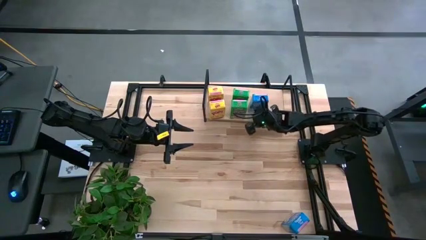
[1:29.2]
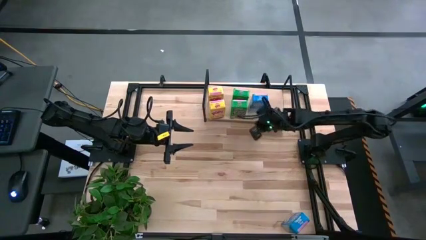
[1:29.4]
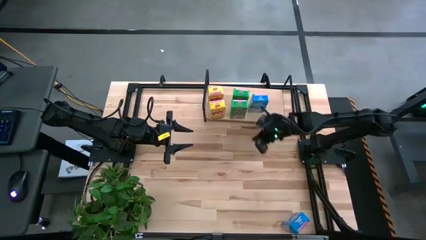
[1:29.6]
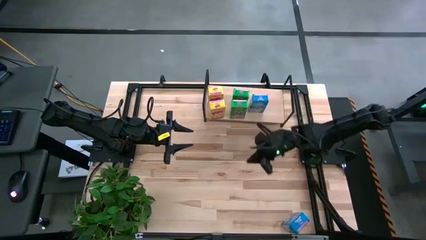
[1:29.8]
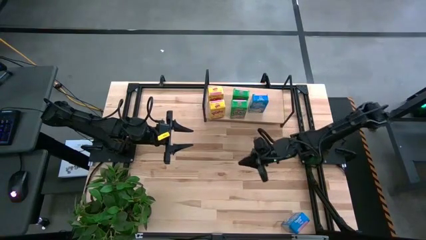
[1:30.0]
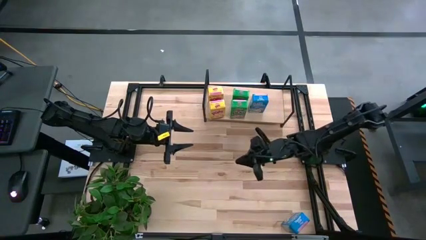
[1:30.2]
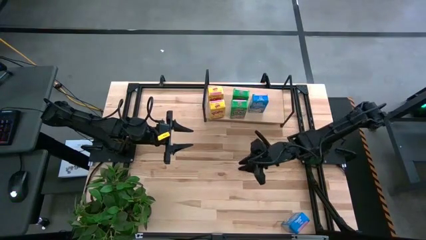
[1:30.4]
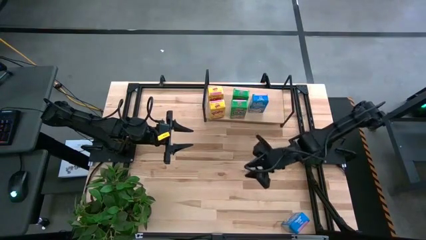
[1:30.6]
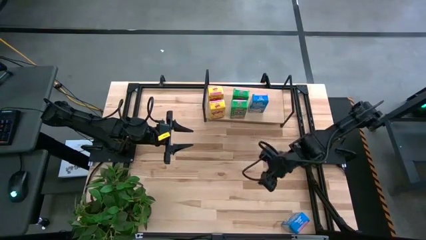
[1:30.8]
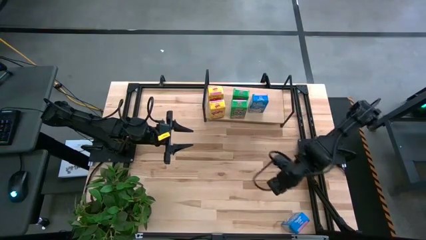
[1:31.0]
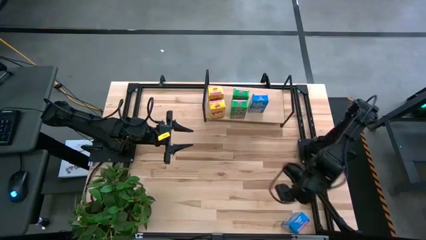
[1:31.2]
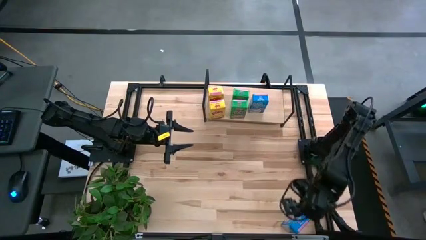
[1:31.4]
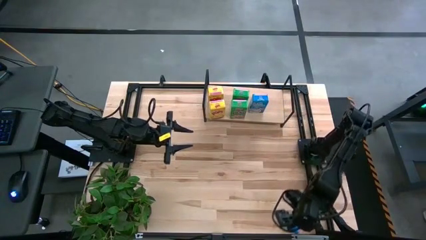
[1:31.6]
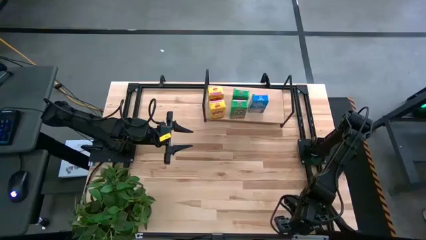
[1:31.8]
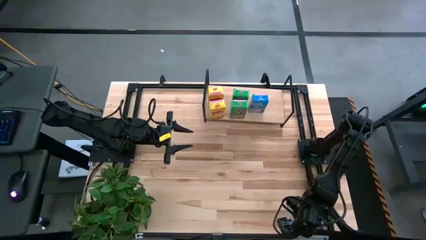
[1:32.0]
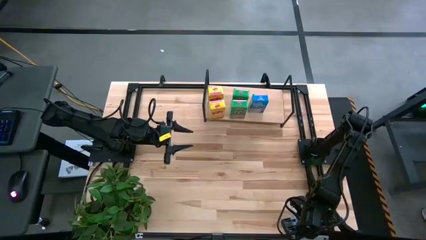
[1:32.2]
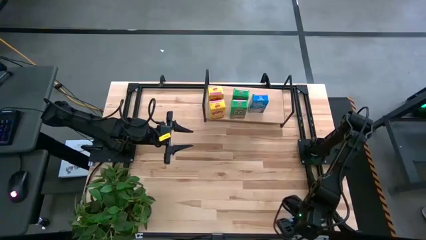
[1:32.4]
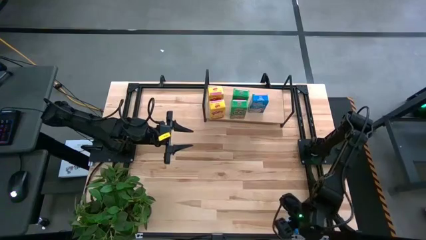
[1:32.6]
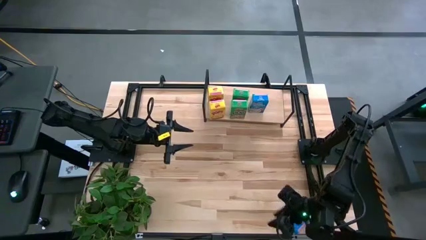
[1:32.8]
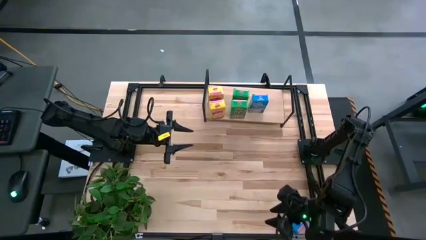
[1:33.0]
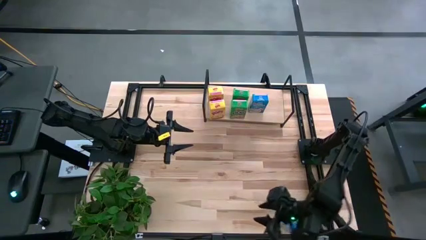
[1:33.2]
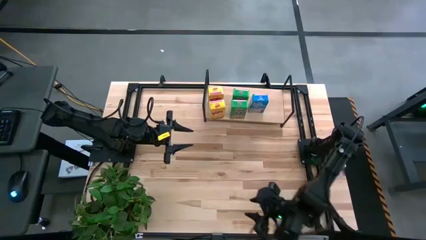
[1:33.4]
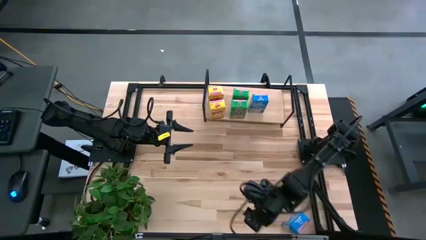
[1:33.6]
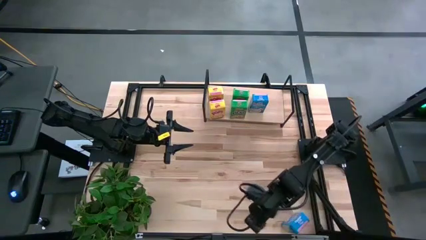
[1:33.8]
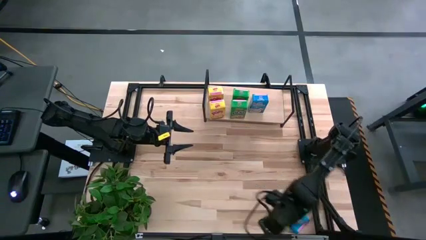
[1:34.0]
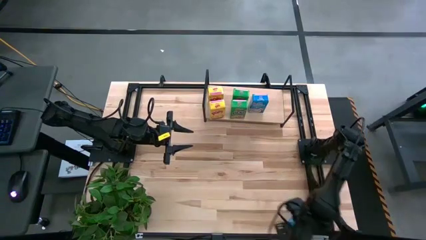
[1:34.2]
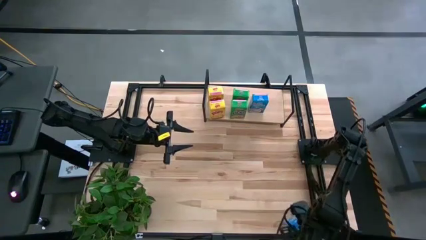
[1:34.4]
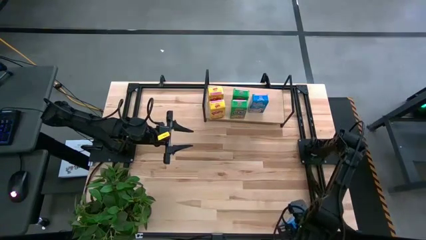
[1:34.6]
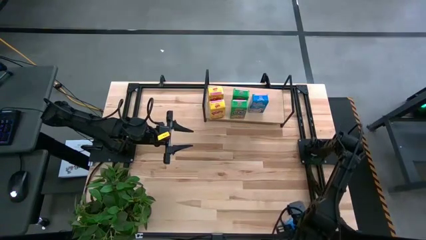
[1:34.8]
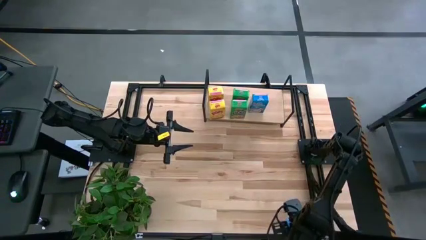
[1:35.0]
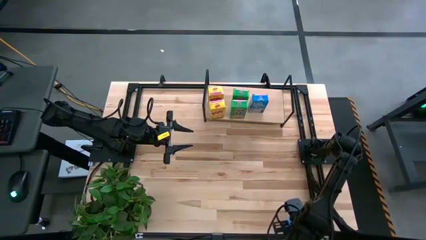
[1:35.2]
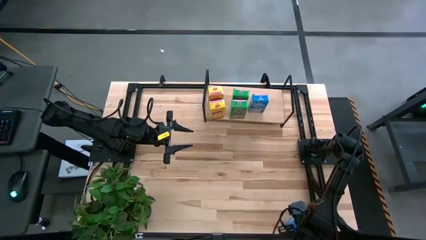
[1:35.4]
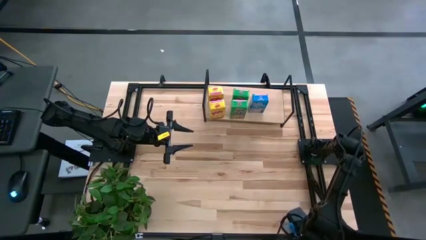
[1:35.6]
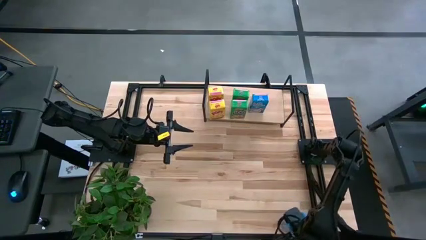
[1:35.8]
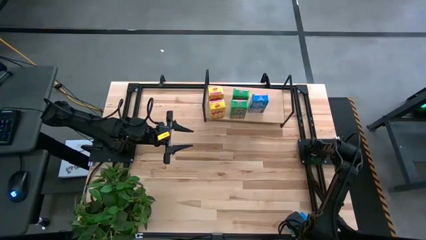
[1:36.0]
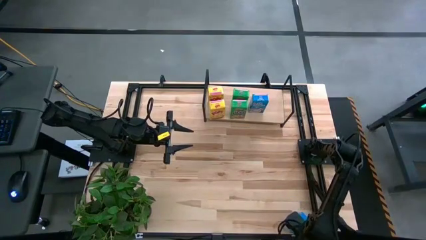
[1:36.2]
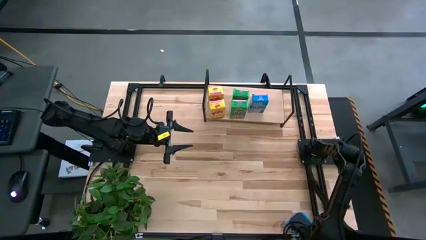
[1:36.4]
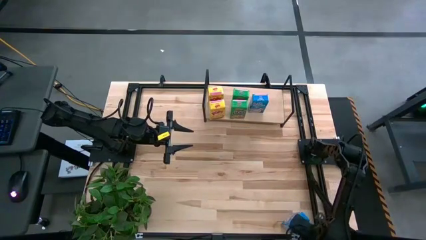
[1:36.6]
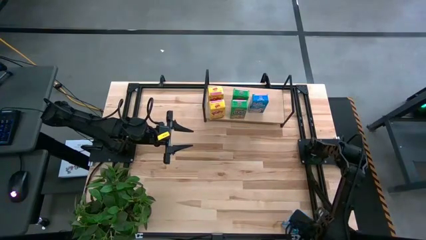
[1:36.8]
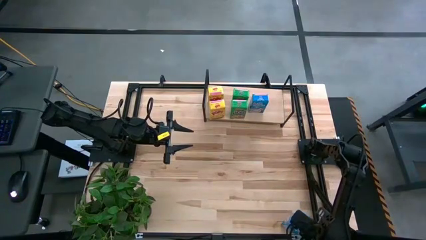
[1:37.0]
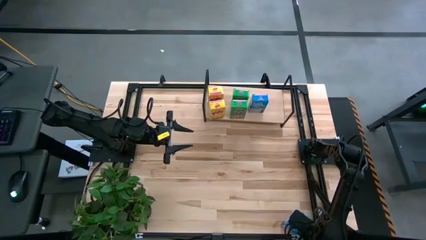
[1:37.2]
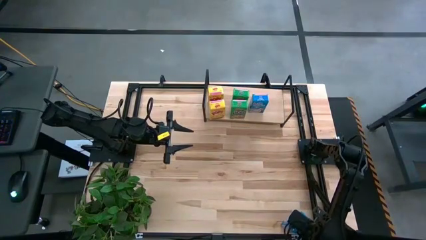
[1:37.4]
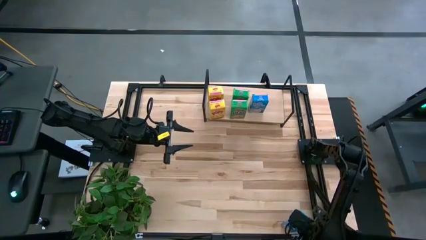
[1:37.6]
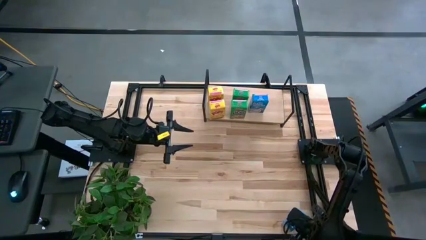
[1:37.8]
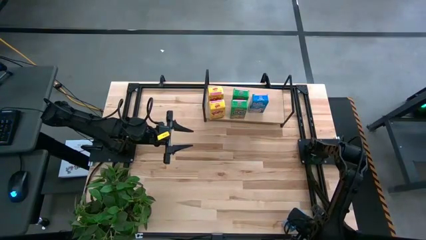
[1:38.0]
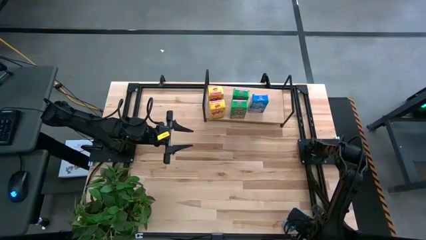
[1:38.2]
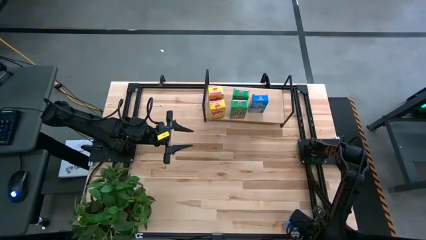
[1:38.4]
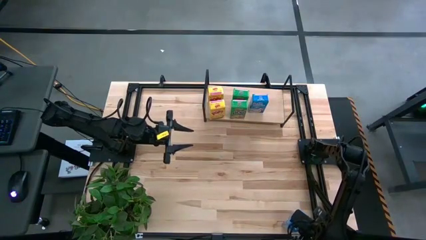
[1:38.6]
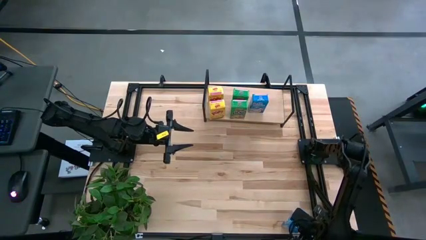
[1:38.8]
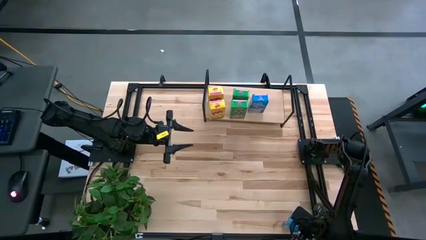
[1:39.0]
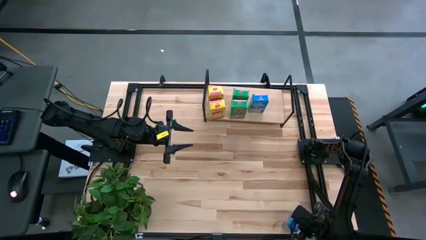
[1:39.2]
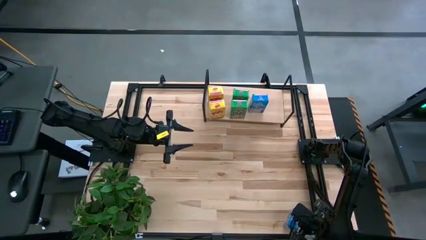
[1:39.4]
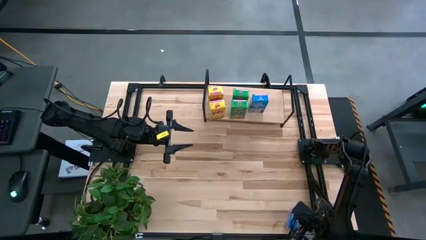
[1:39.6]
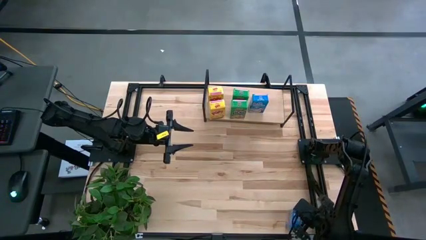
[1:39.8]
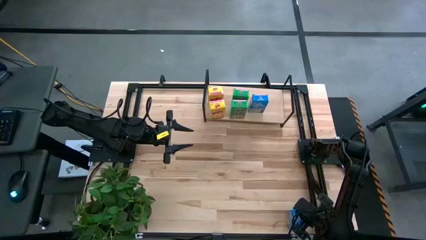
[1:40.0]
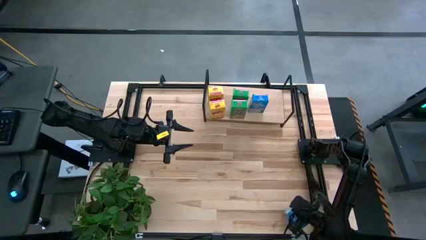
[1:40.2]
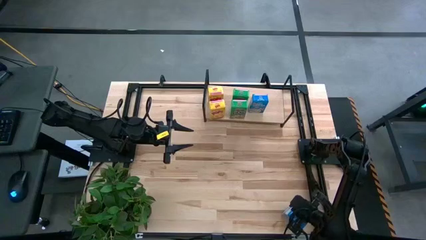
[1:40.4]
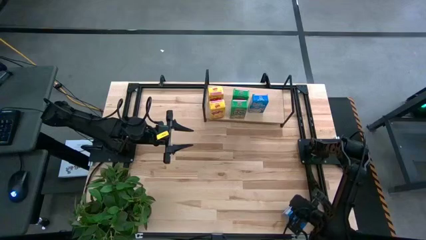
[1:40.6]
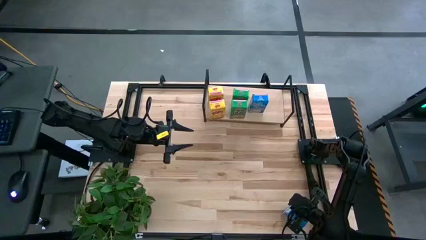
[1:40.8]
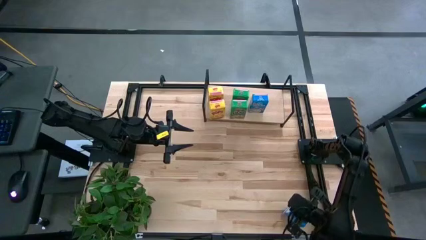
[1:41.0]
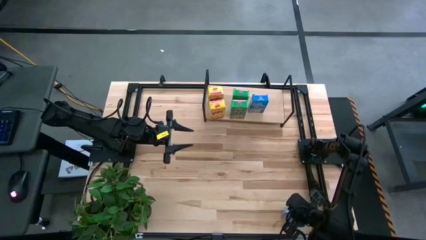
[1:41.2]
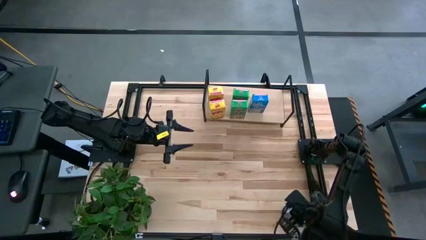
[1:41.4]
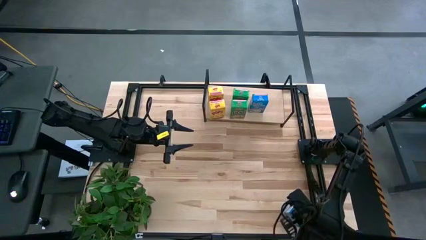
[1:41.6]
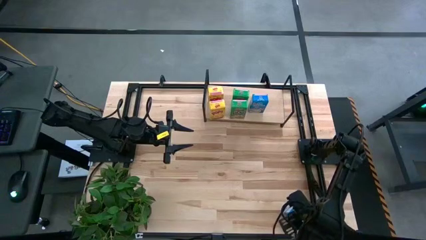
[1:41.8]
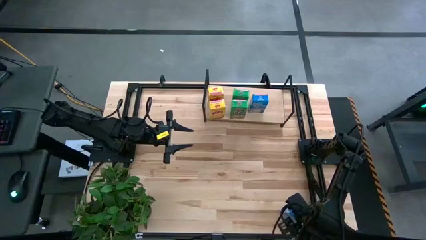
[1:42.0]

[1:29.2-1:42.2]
Task: Stack cereal on shelf
Put the blue cereal box on the shelf
